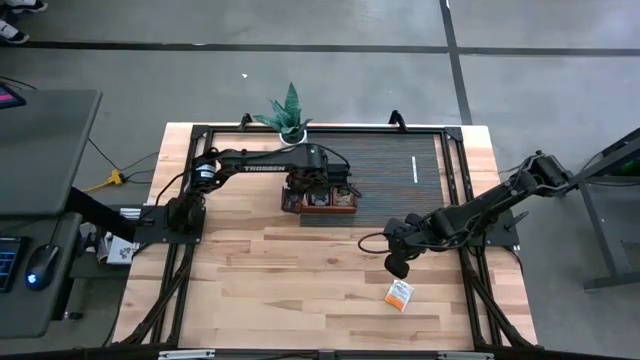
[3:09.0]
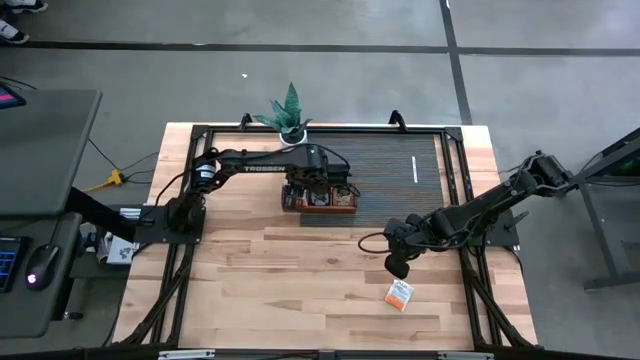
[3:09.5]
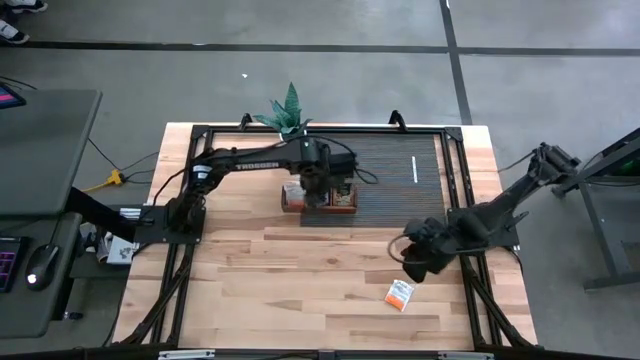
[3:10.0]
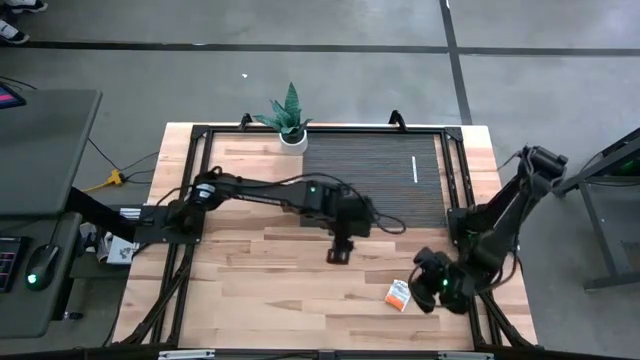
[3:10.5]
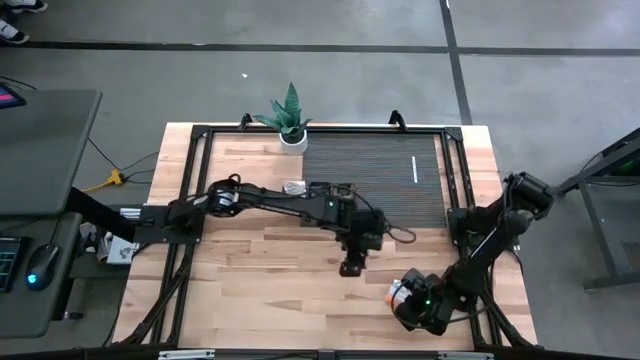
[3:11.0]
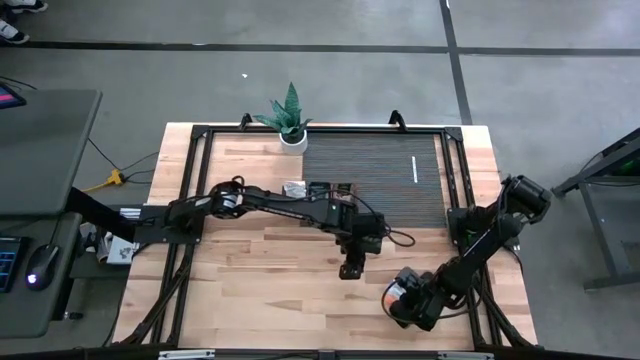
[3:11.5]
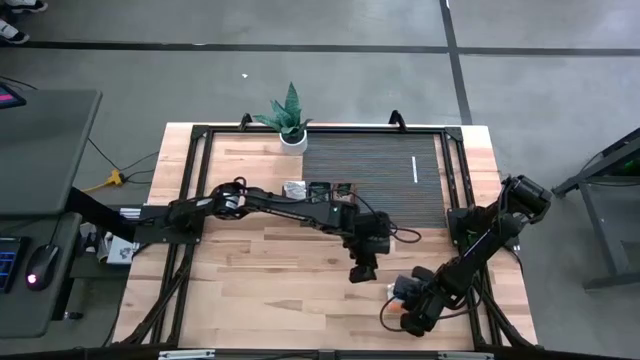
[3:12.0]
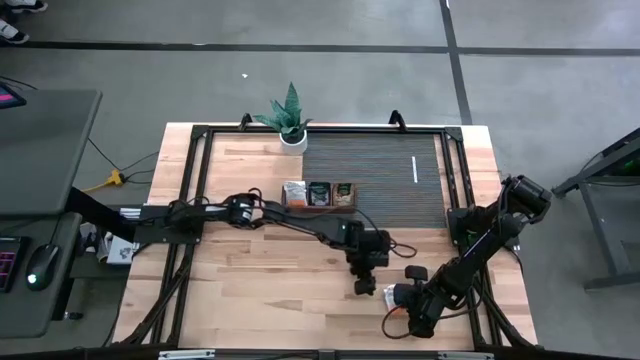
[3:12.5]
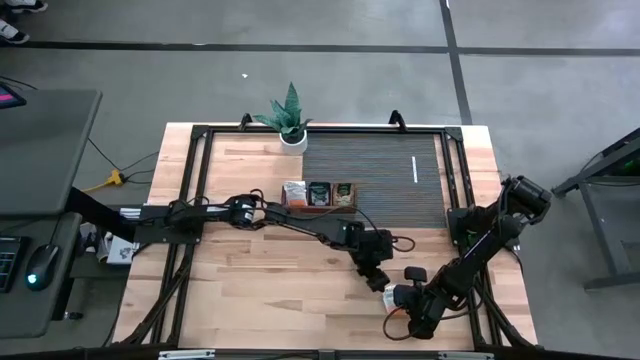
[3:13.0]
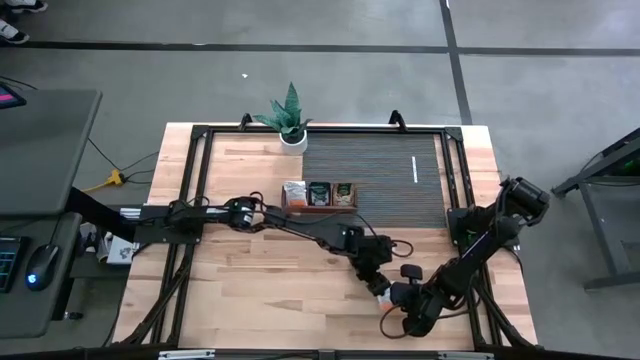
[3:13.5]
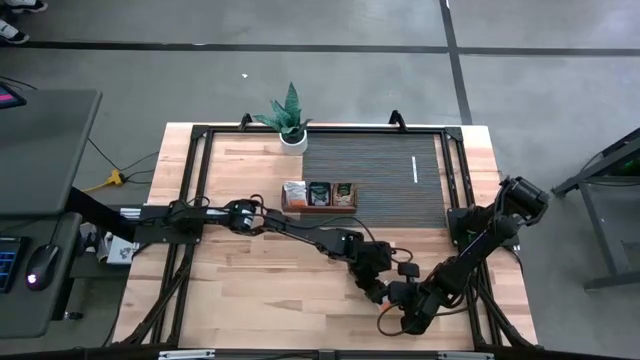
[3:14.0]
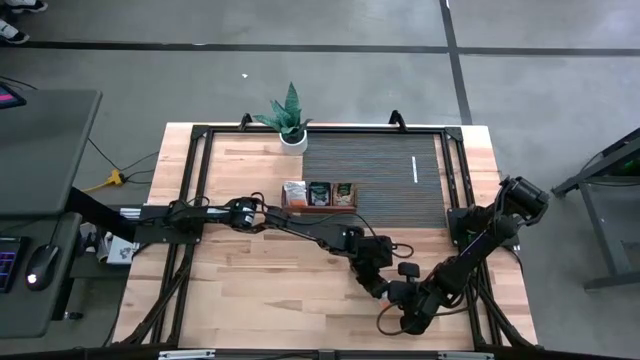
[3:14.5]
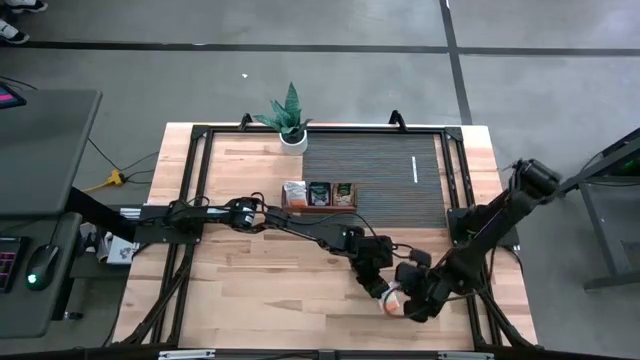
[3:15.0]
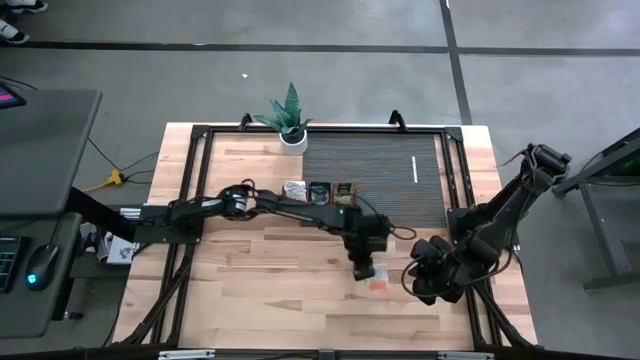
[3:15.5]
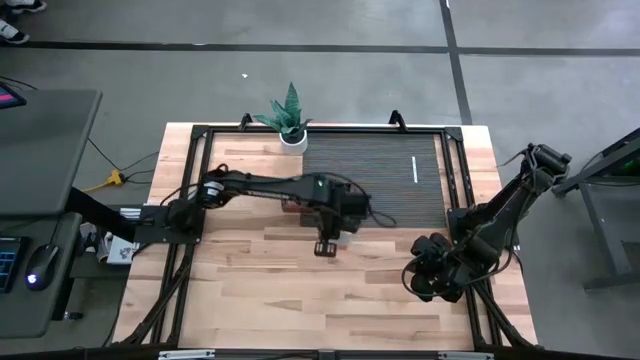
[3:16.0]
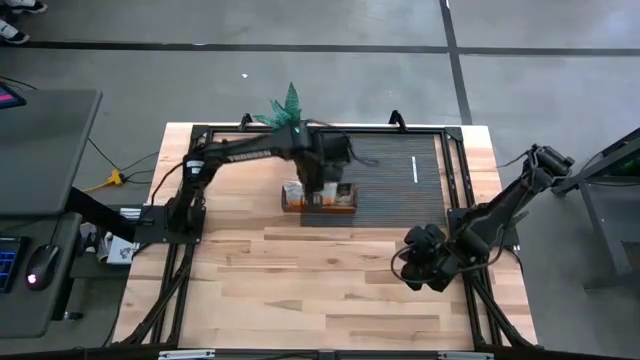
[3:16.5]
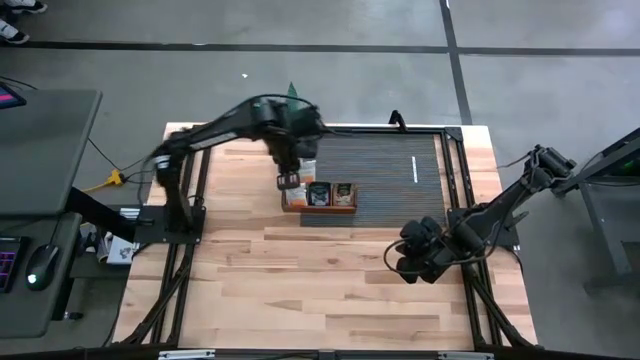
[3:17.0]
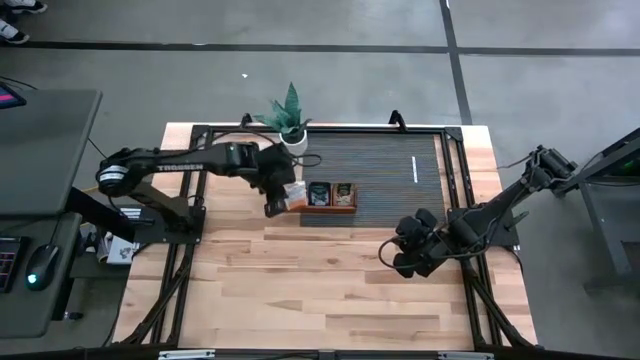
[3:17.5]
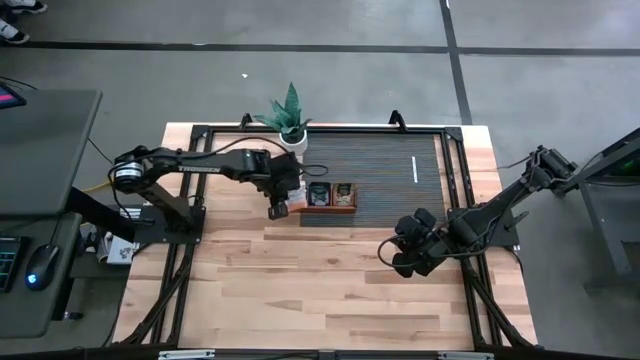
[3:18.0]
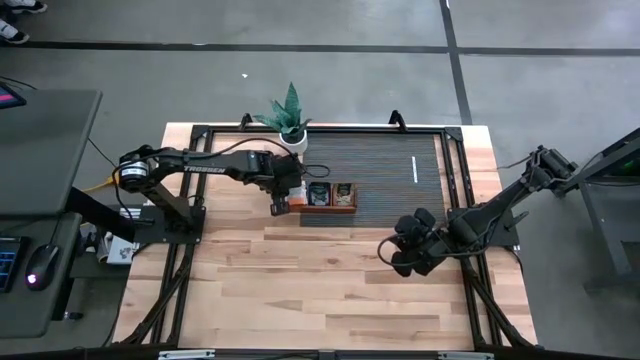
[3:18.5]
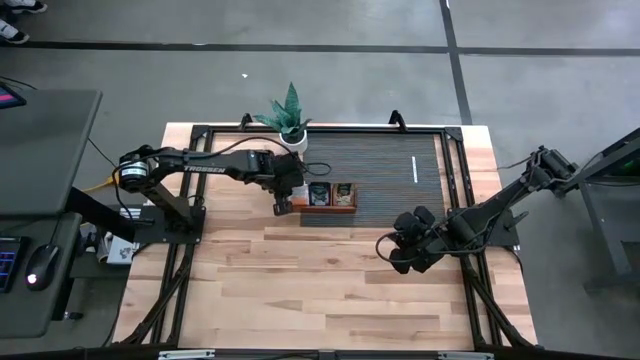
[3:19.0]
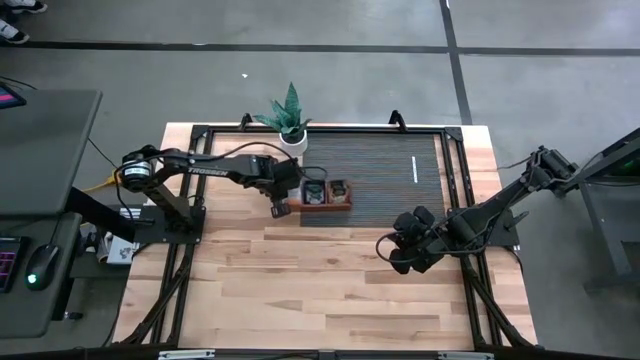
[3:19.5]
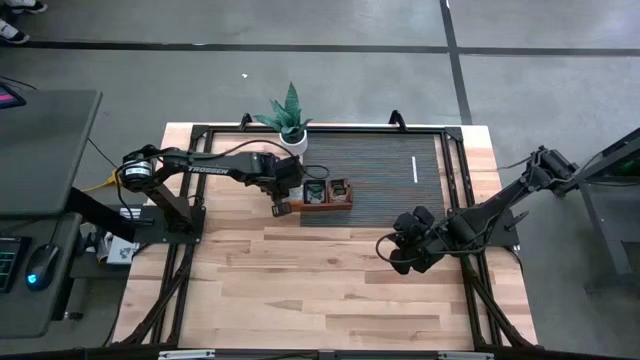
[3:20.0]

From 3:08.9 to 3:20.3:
Task: Pick & Place Tea
Put the orange tea bag into the left section of the wooden organizer

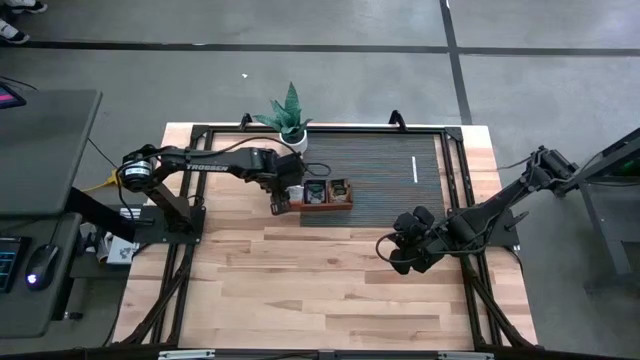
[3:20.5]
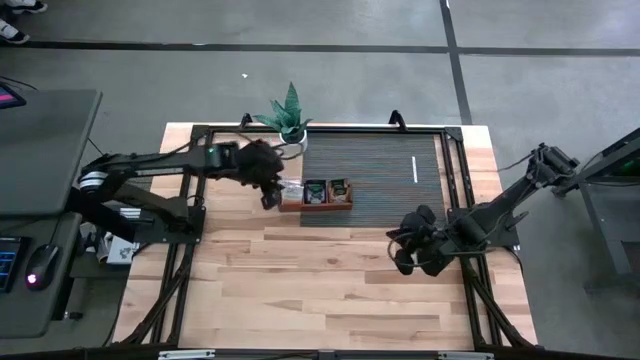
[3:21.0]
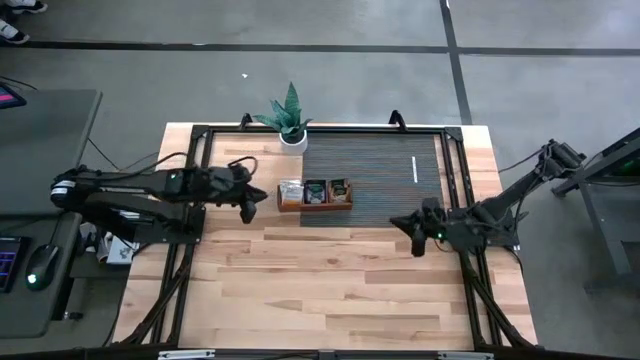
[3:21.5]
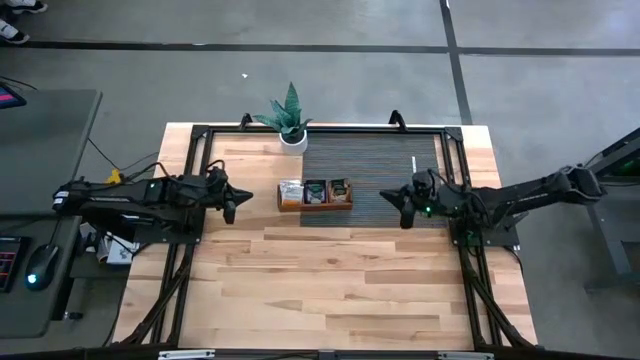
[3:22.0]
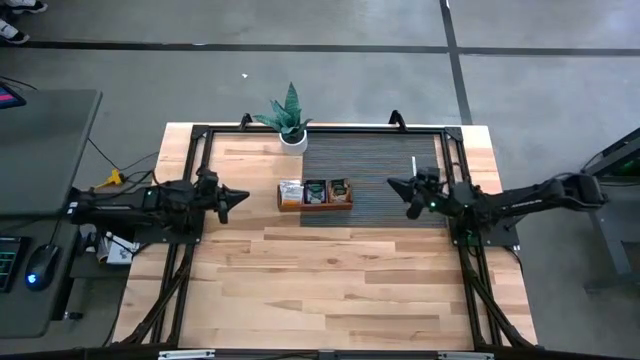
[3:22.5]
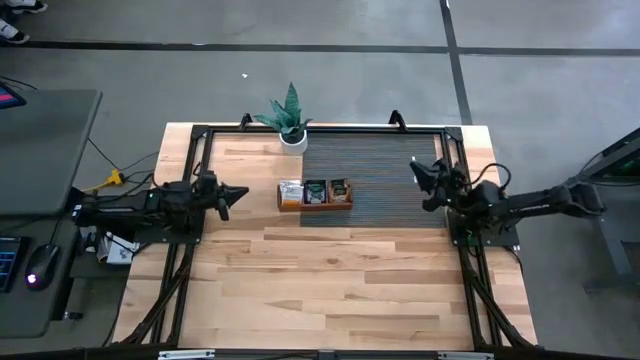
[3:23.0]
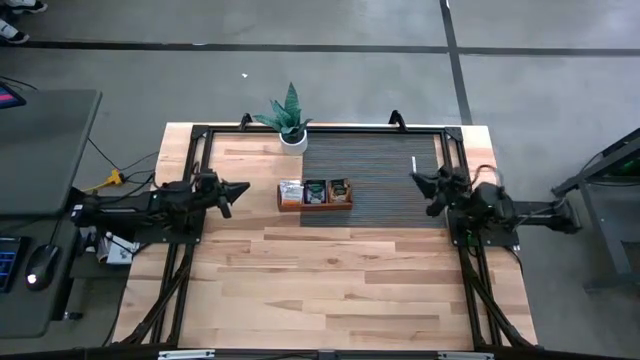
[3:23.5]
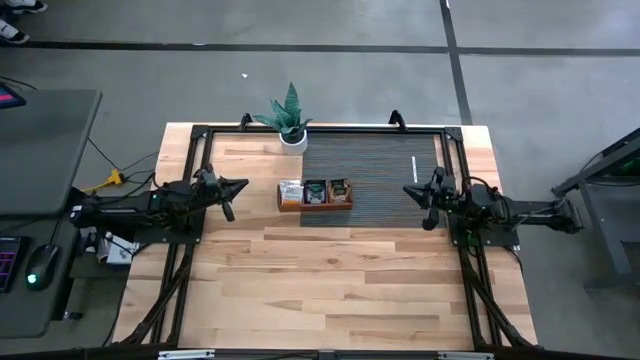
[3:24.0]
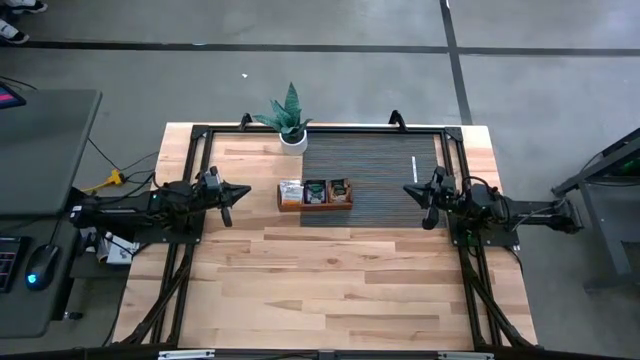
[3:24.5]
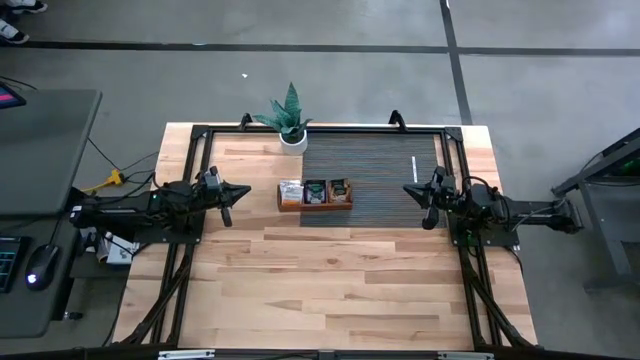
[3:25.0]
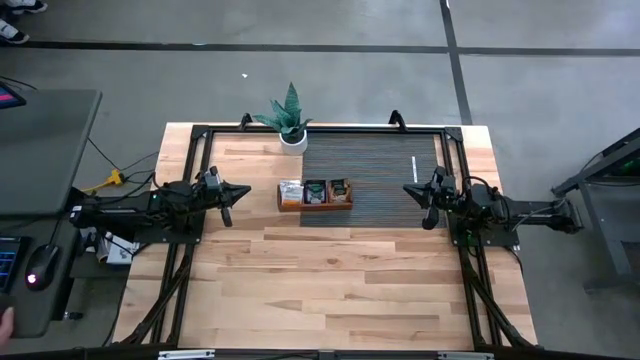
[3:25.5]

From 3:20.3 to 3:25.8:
Return to Home Position

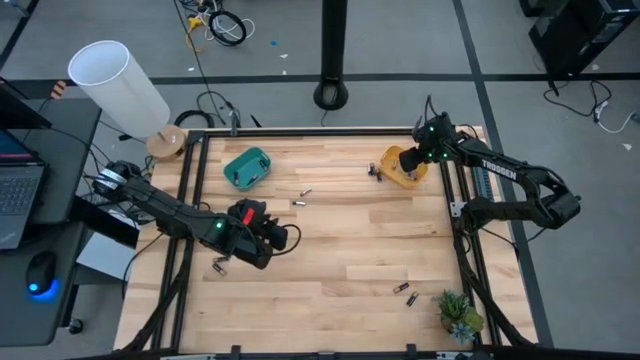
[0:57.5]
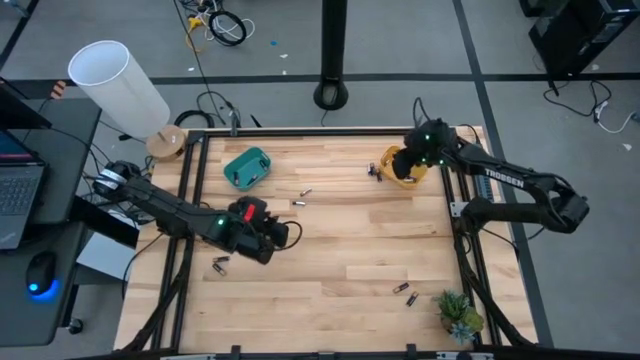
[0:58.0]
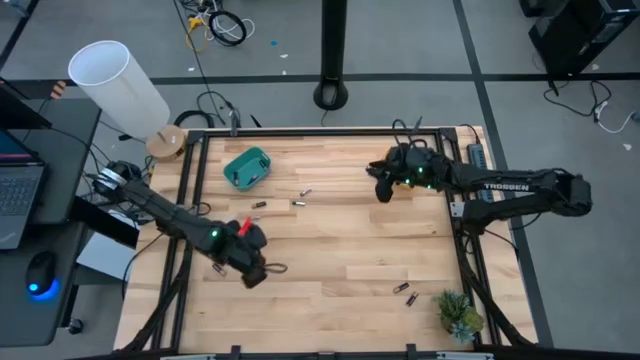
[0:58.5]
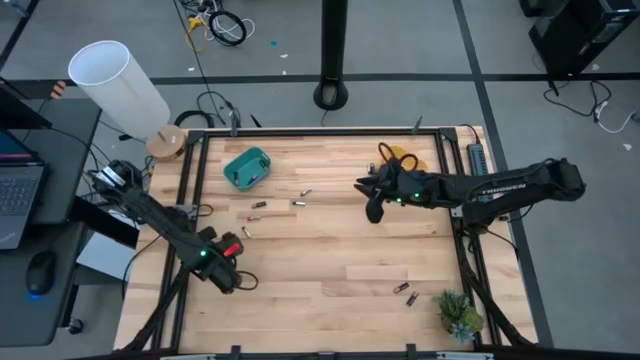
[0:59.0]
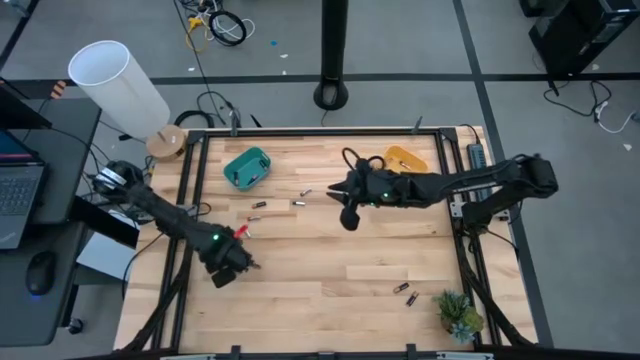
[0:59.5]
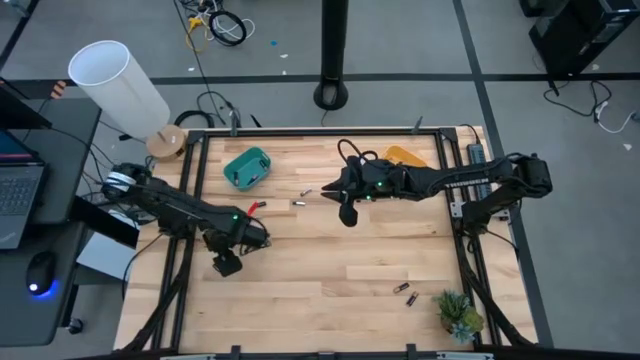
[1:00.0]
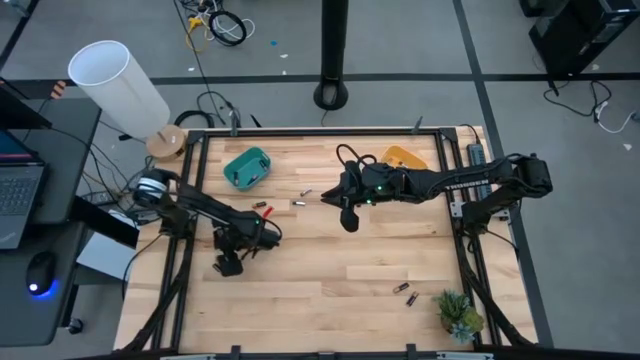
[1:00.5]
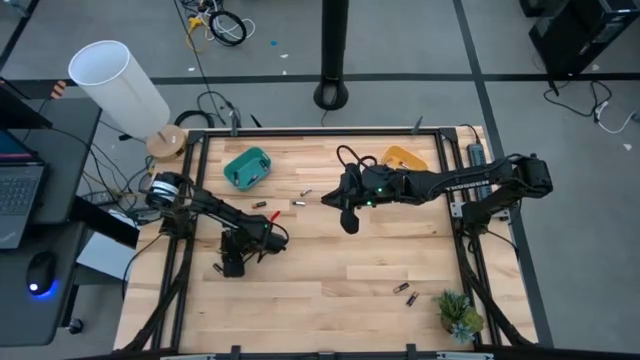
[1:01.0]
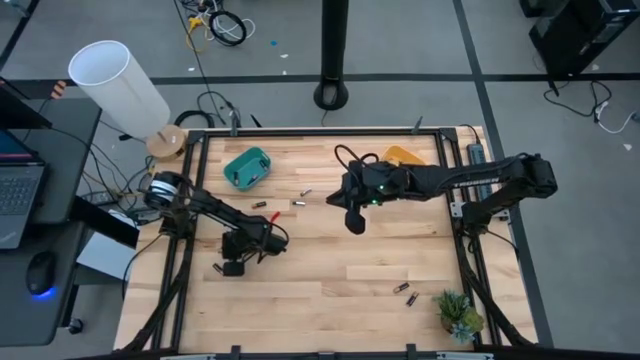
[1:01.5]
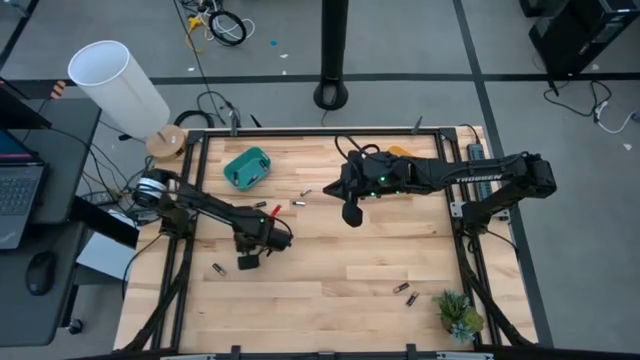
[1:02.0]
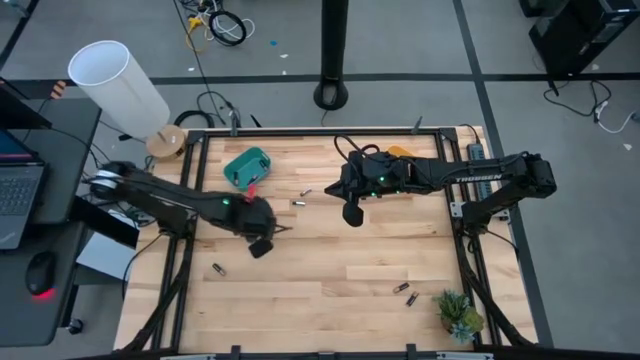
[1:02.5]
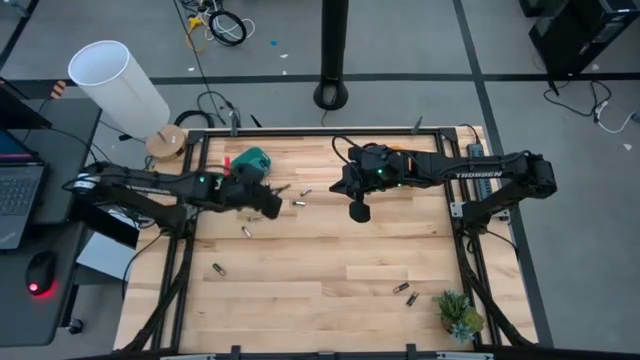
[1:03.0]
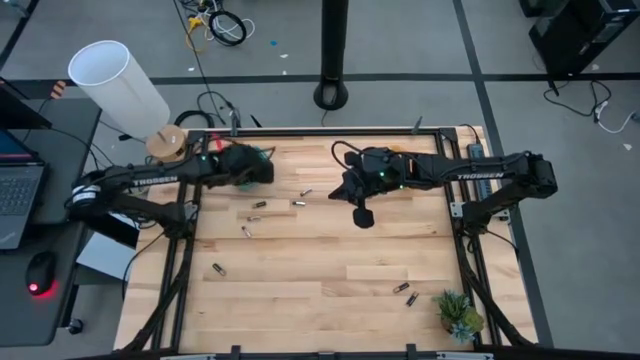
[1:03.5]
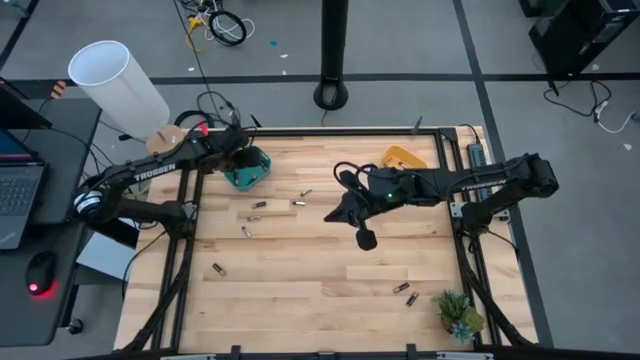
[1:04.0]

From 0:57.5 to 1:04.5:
Task: Sort batteries
Put the black battery into the blue bin
